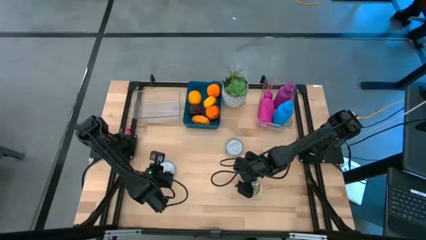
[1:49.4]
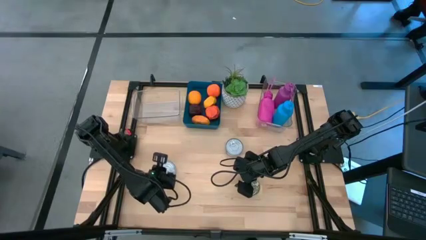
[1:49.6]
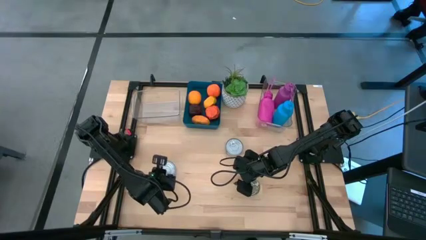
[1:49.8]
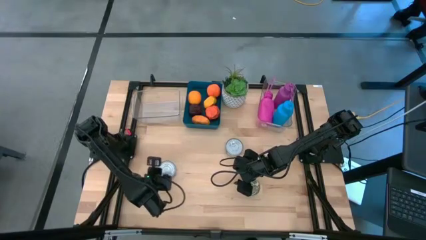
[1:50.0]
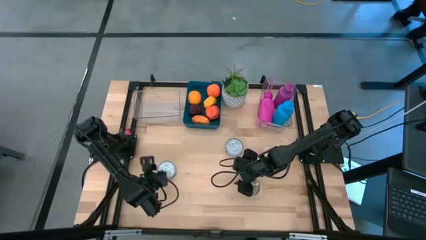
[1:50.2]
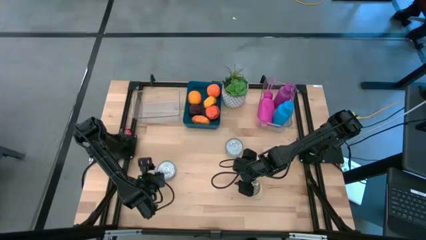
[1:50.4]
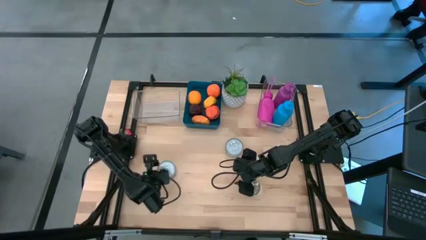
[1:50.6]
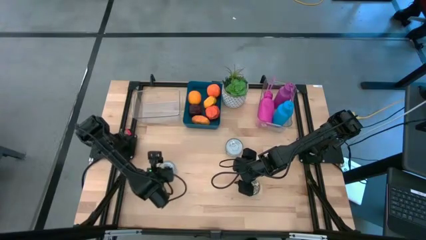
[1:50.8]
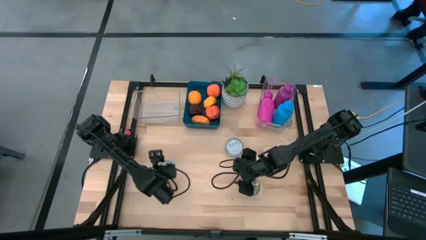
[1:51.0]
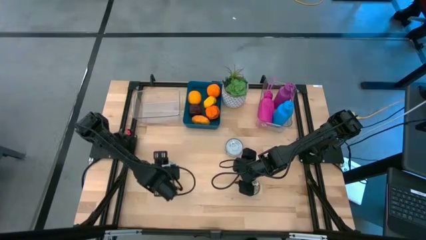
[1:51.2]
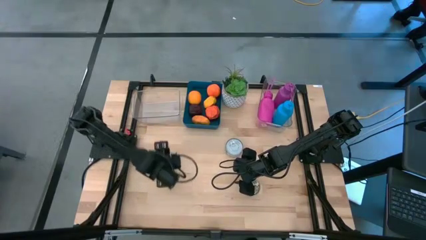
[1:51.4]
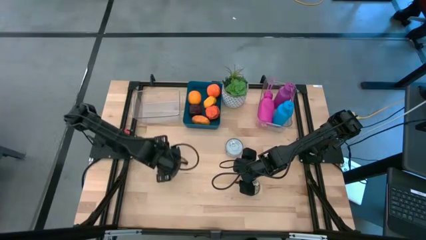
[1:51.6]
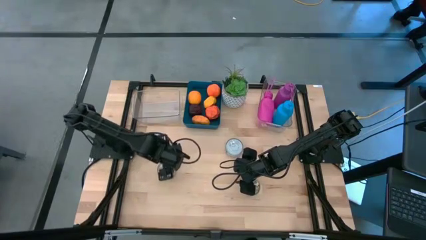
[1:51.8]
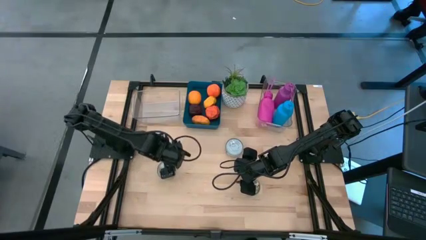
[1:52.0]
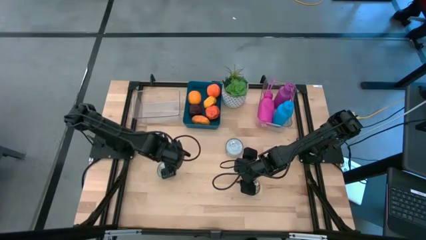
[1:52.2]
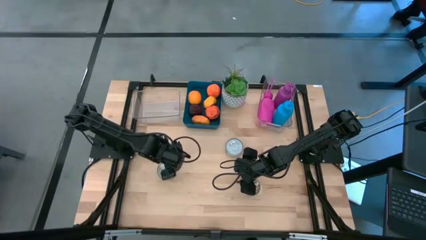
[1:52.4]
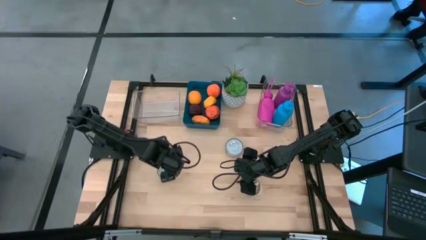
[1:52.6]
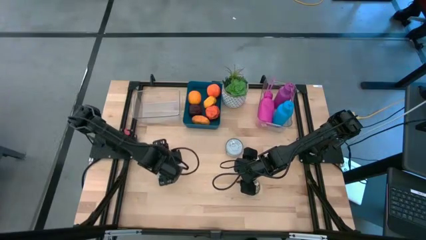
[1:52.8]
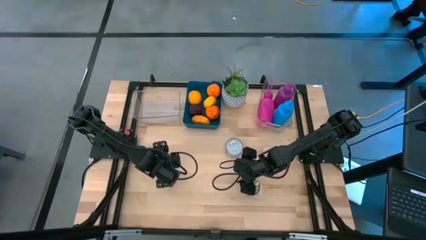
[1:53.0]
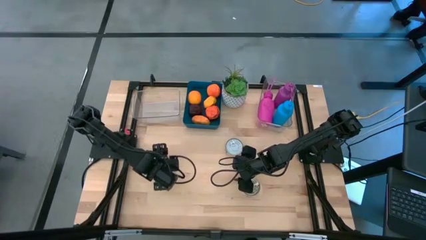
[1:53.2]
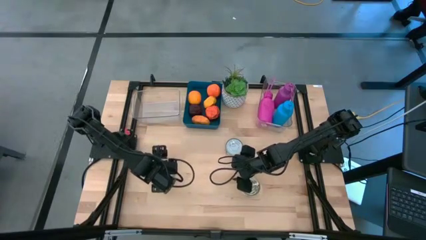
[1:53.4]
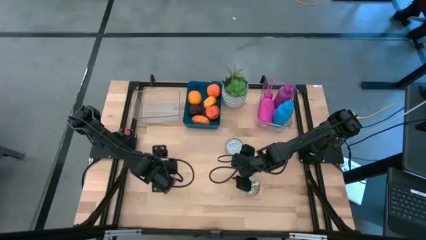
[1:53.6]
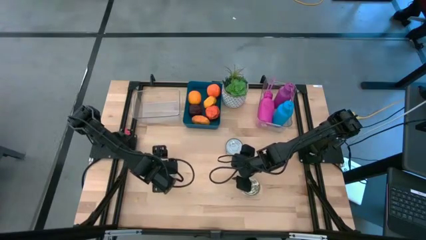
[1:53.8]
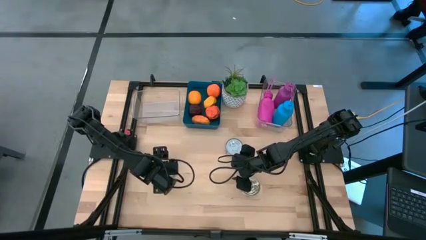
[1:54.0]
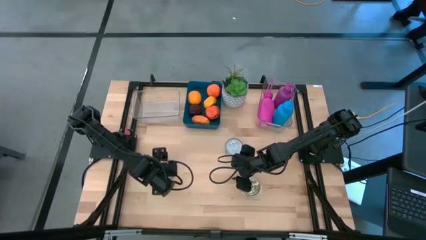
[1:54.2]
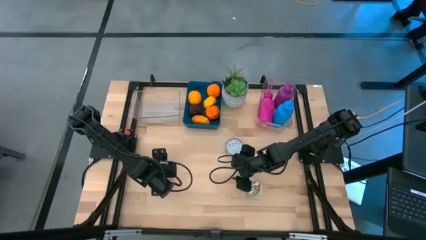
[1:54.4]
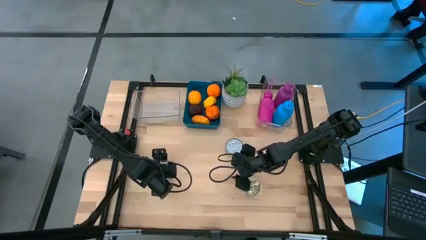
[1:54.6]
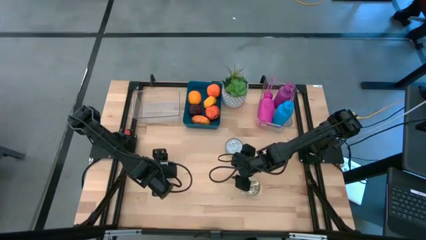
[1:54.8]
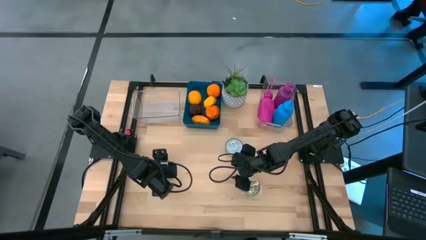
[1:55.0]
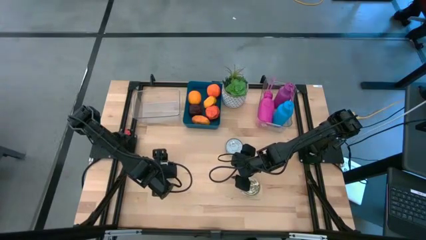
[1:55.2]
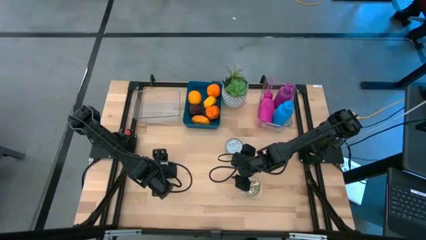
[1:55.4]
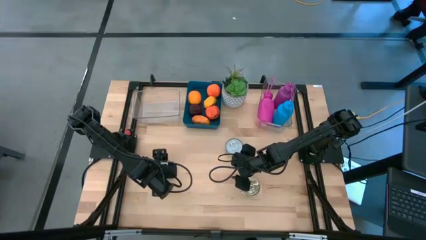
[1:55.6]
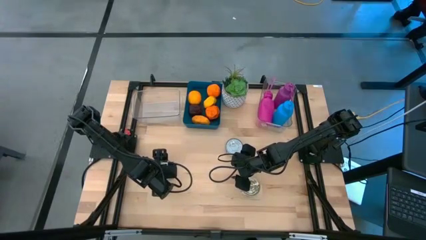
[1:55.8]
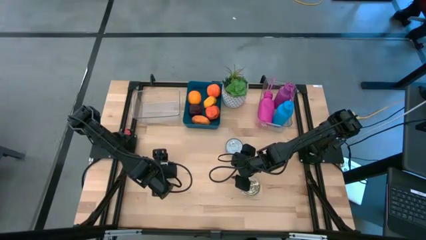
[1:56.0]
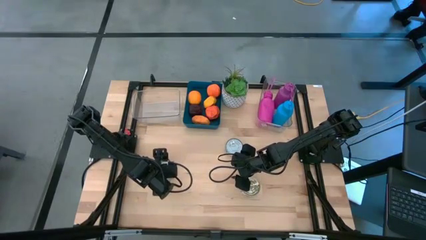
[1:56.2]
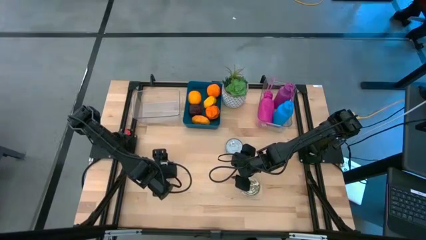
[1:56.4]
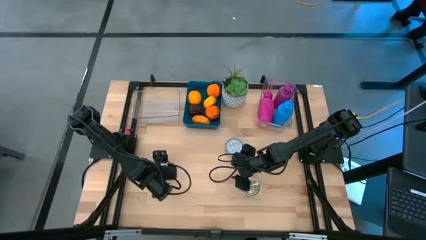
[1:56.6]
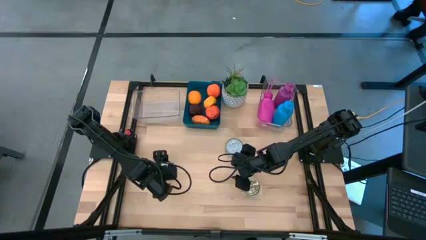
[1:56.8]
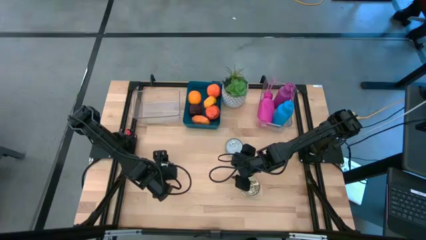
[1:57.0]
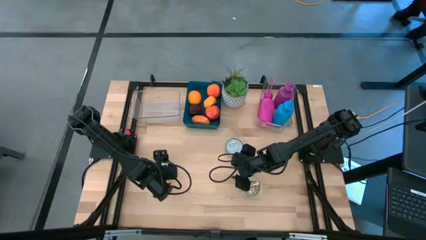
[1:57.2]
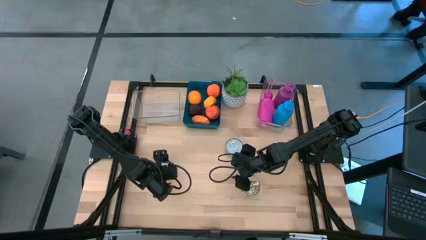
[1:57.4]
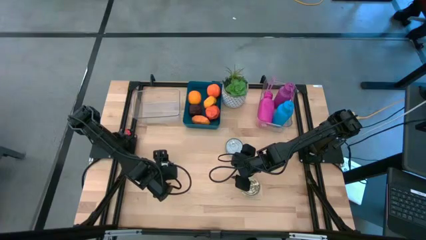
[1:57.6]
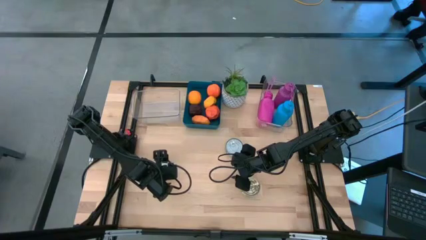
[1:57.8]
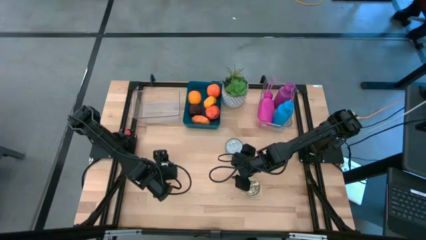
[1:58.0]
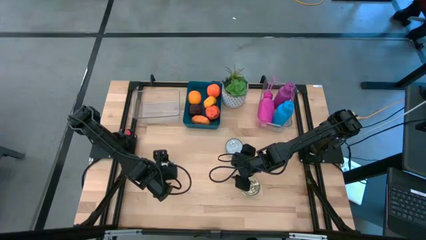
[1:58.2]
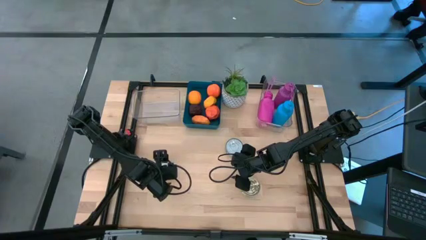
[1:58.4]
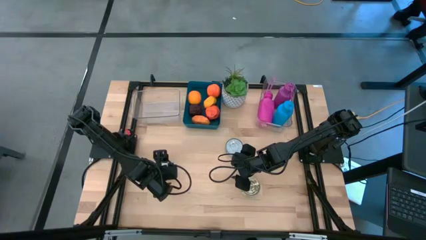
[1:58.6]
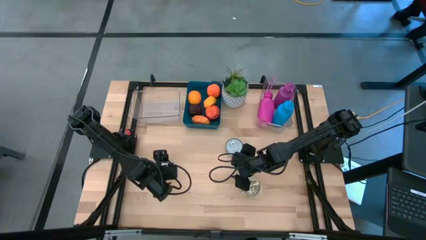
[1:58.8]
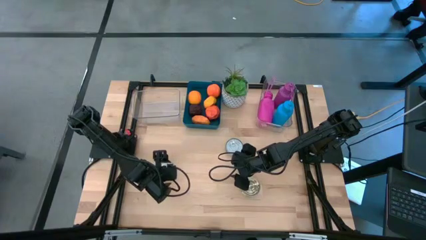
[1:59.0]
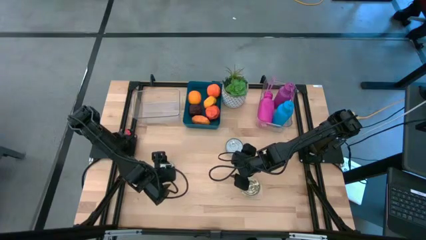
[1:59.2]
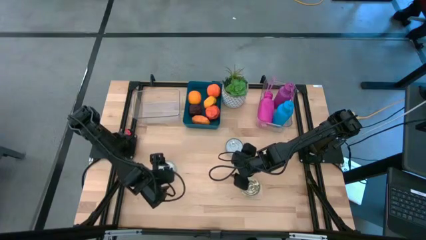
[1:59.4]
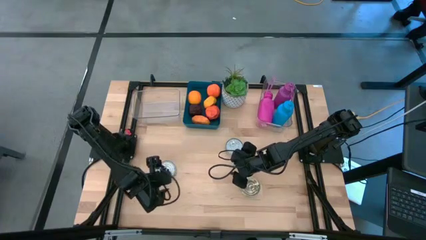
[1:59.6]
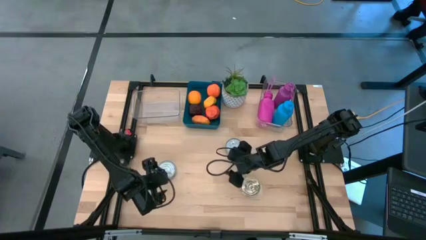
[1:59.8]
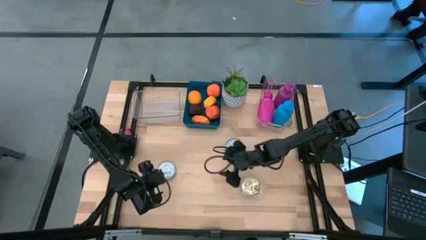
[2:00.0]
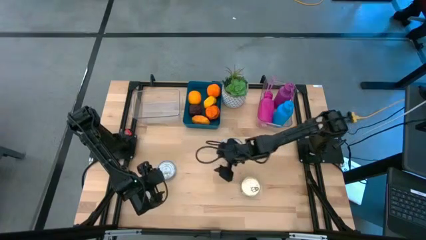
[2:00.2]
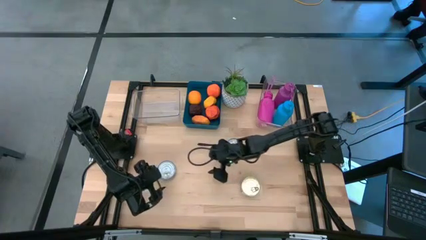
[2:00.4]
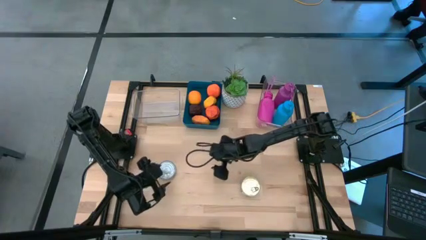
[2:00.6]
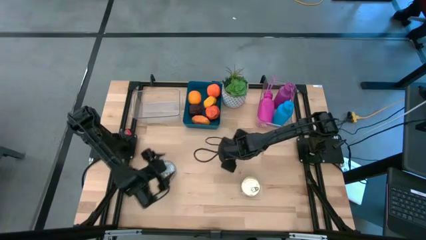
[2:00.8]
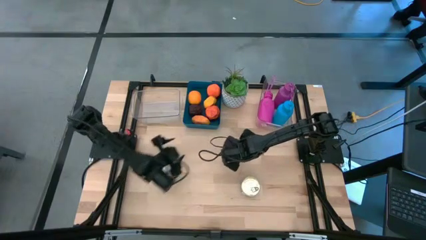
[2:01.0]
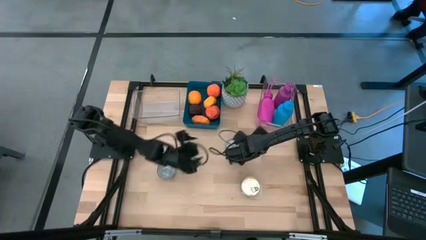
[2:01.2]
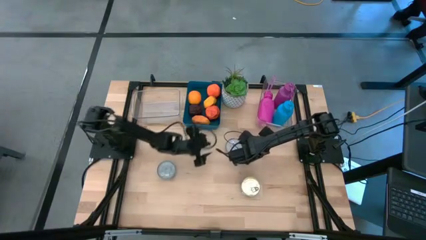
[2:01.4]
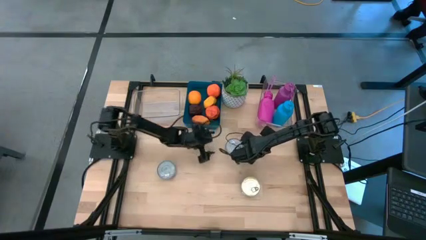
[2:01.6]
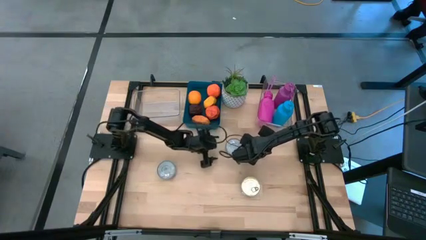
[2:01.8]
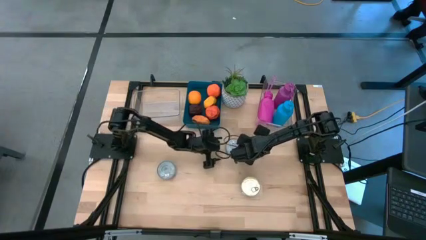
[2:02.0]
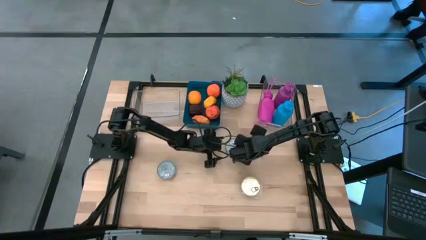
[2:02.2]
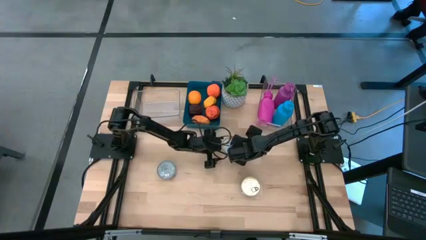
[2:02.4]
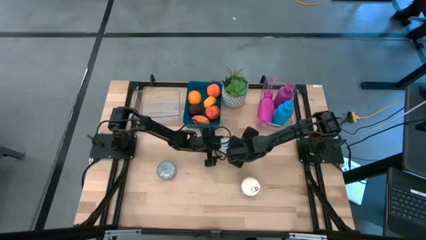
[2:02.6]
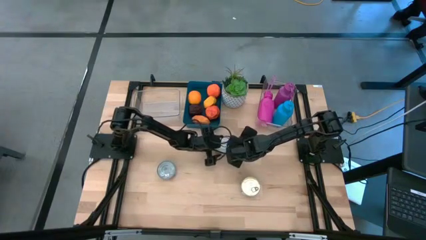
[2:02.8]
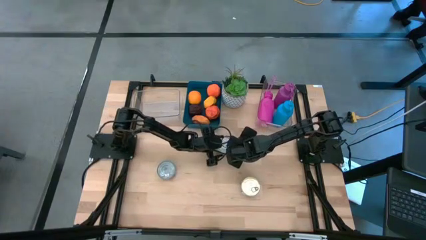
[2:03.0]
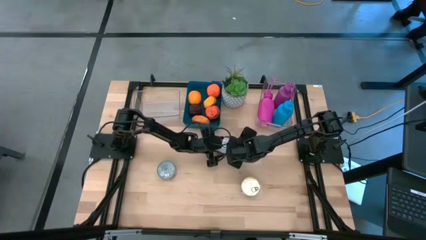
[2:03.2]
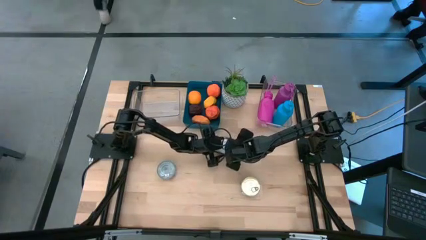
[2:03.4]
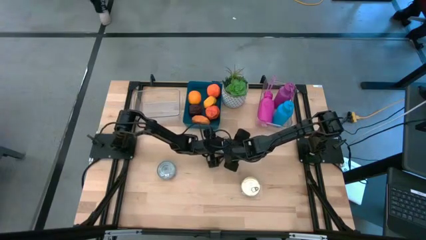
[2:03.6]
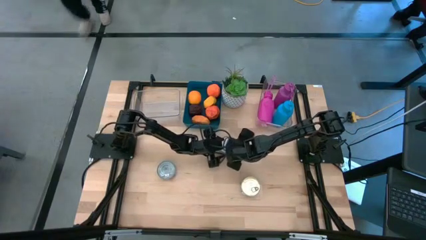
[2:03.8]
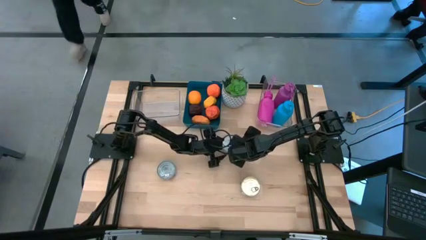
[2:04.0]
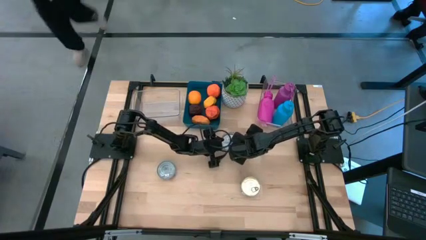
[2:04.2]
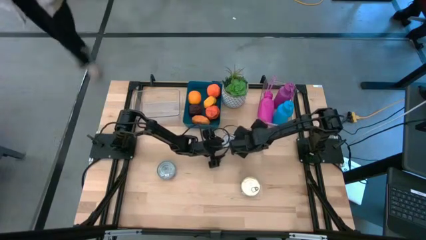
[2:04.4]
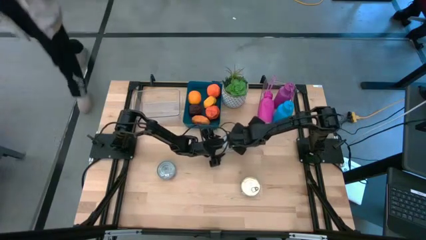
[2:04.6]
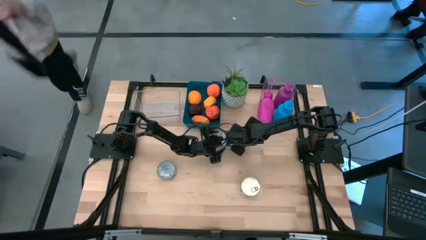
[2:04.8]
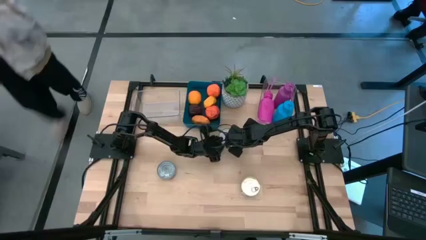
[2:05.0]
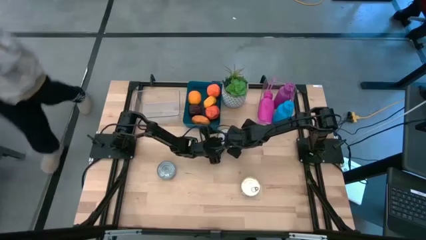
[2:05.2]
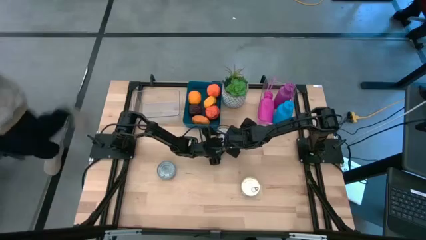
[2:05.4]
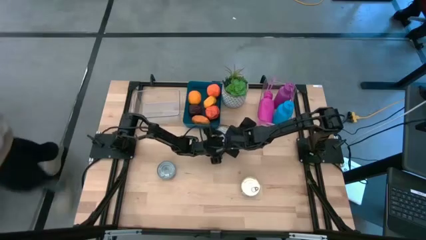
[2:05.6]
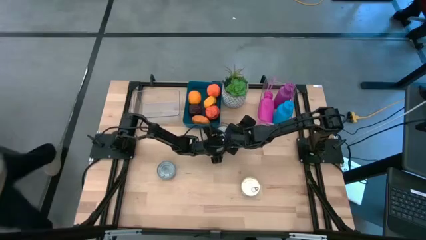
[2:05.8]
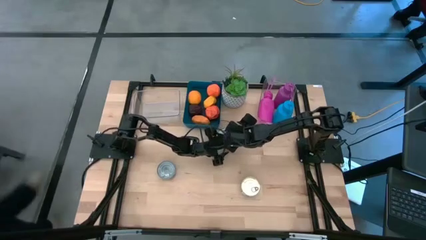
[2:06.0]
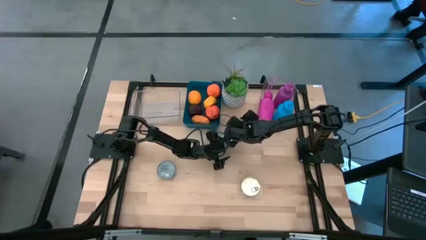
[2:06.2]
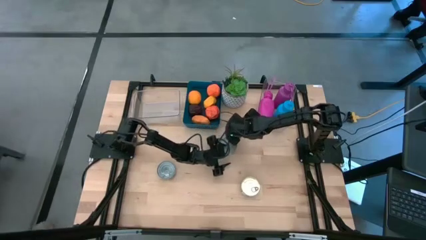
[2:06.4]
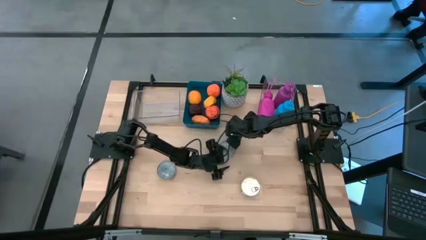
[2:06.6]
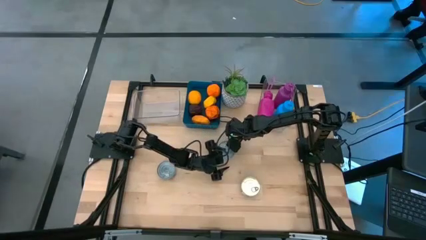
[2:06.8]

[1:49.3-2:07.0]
Task: Pick & Place Food Item
Put the blue tuna can into the left transparent bin
